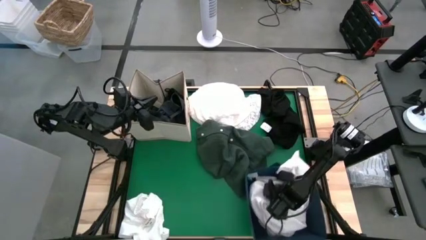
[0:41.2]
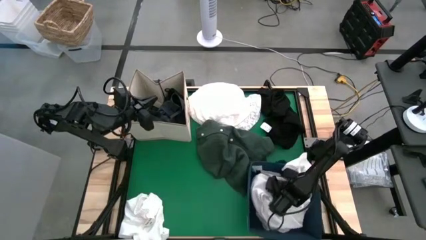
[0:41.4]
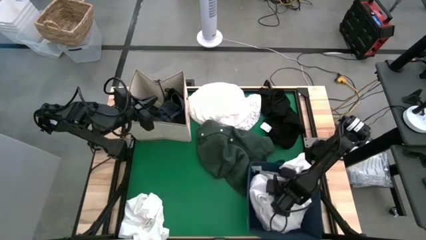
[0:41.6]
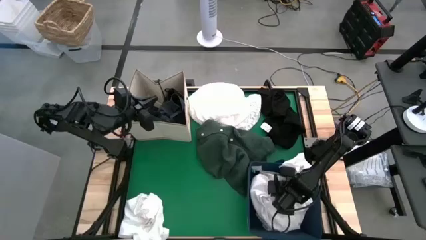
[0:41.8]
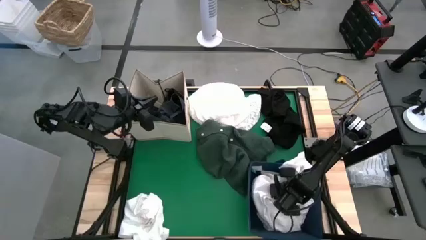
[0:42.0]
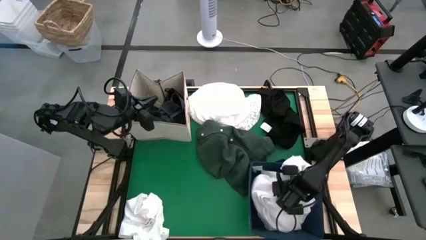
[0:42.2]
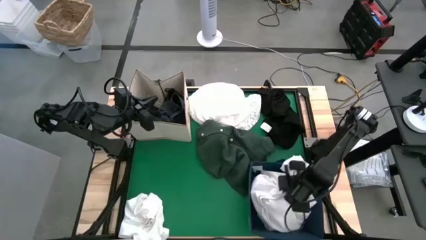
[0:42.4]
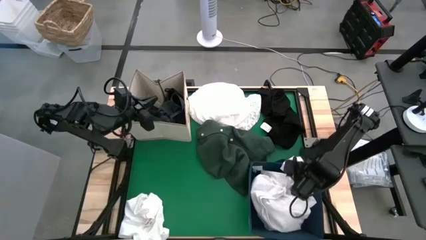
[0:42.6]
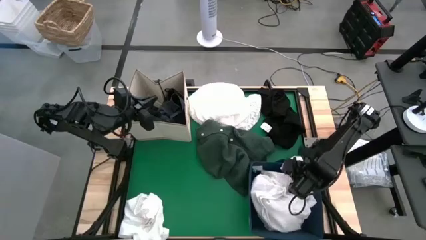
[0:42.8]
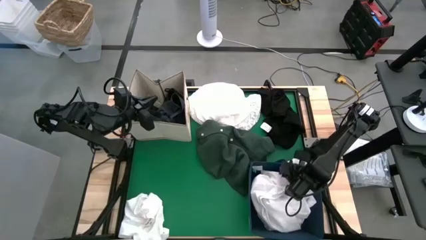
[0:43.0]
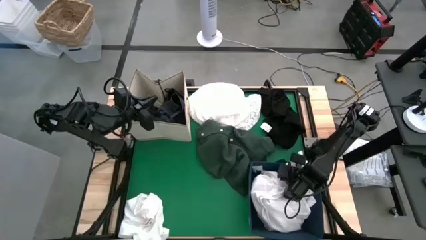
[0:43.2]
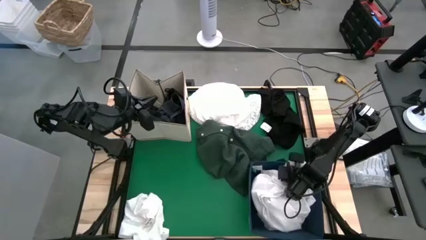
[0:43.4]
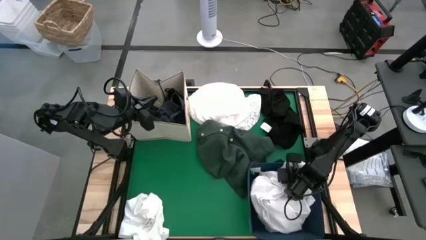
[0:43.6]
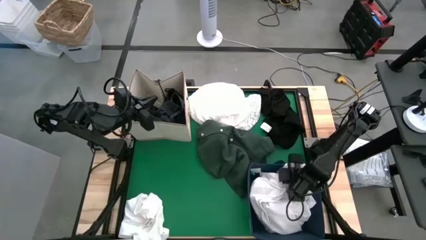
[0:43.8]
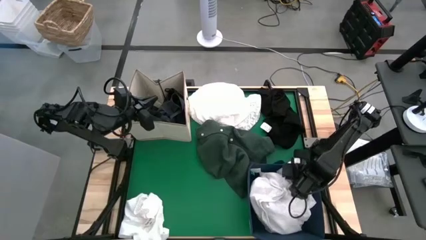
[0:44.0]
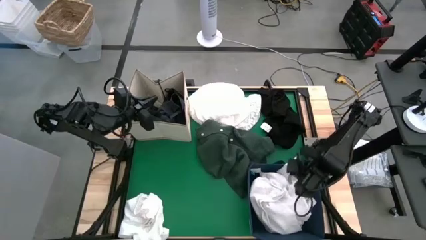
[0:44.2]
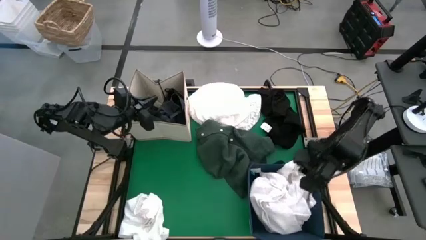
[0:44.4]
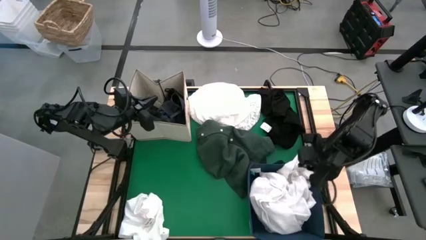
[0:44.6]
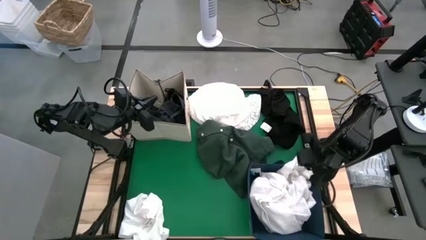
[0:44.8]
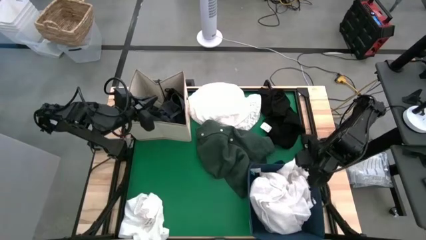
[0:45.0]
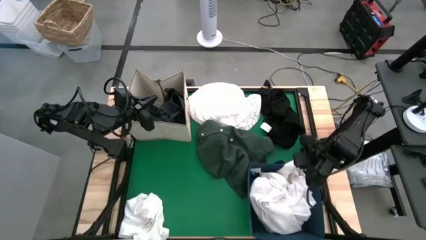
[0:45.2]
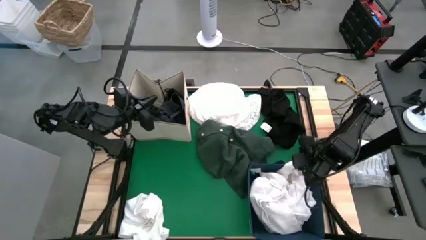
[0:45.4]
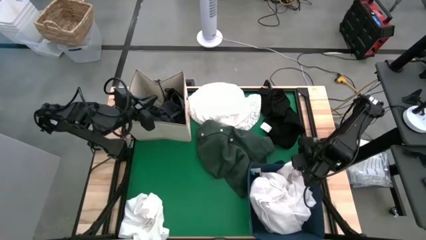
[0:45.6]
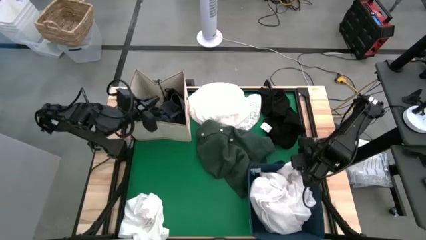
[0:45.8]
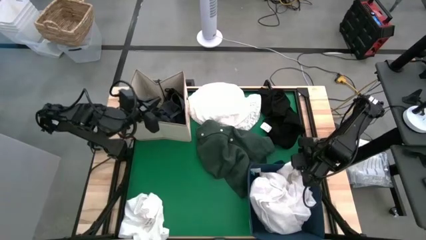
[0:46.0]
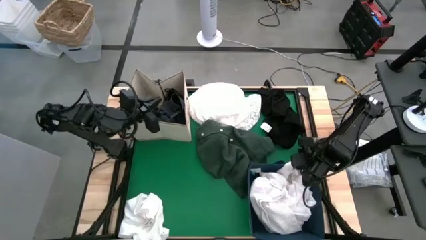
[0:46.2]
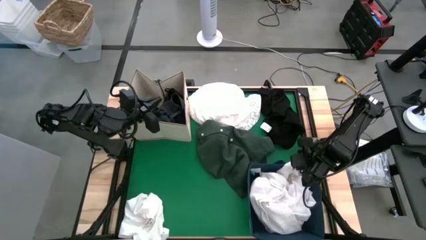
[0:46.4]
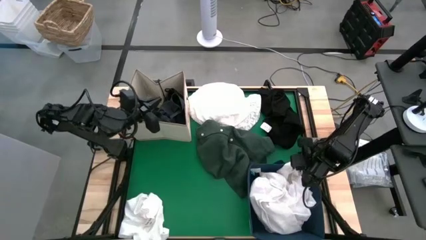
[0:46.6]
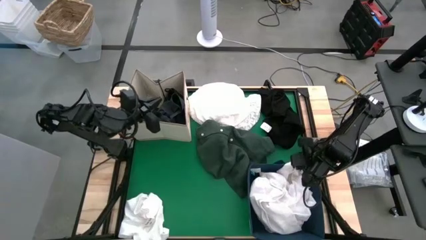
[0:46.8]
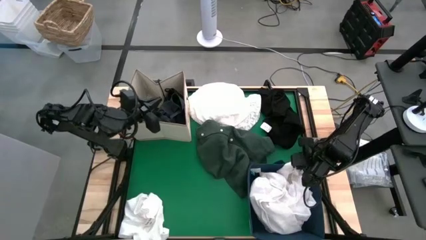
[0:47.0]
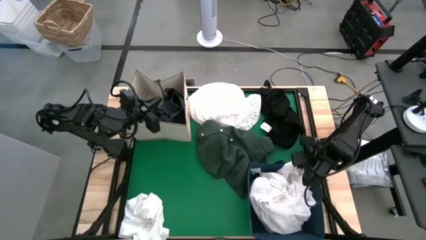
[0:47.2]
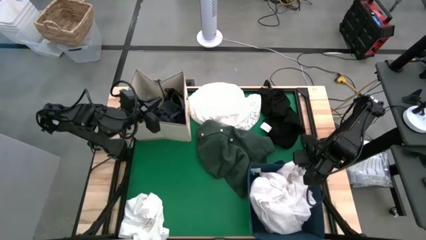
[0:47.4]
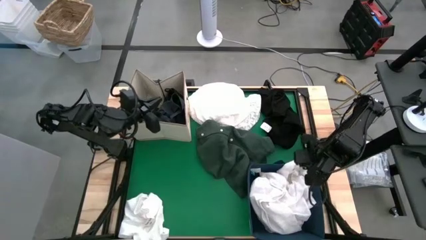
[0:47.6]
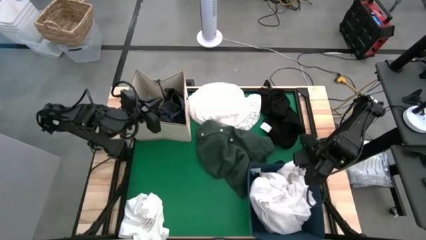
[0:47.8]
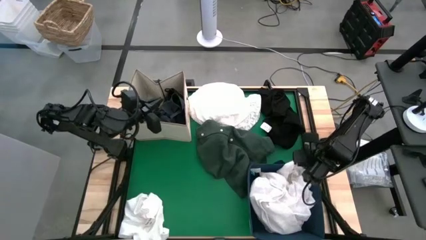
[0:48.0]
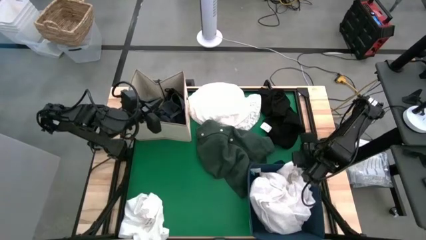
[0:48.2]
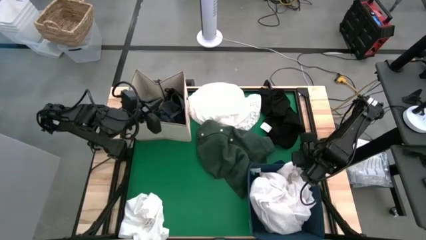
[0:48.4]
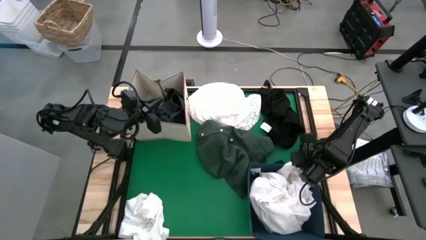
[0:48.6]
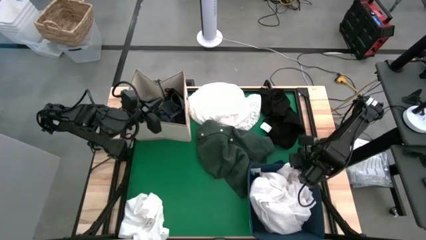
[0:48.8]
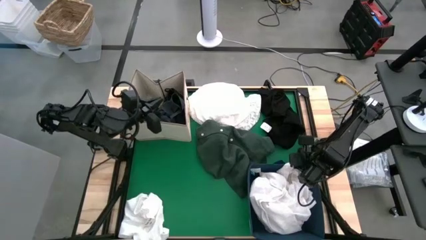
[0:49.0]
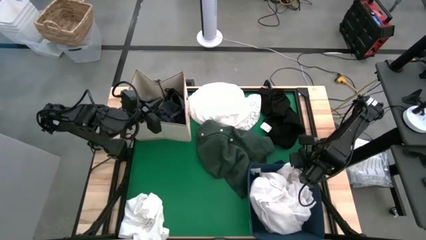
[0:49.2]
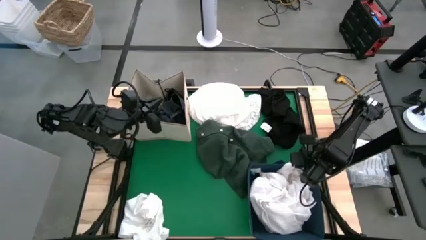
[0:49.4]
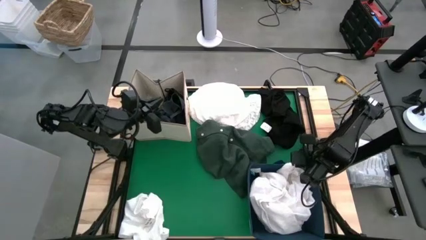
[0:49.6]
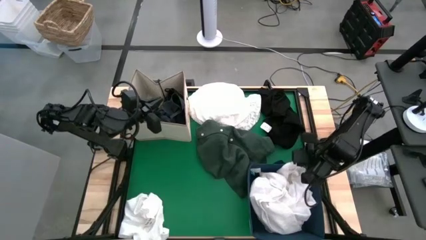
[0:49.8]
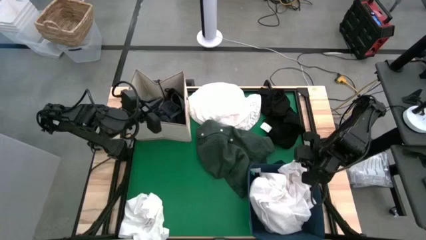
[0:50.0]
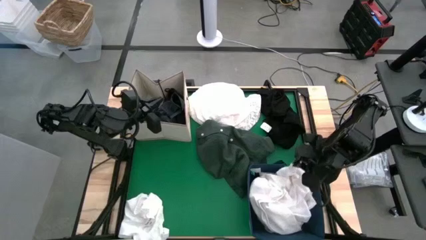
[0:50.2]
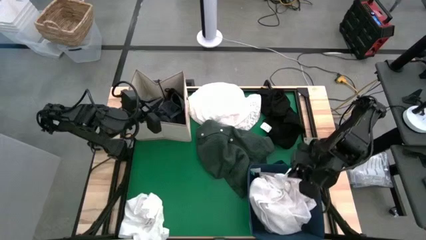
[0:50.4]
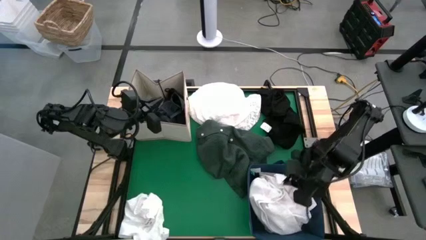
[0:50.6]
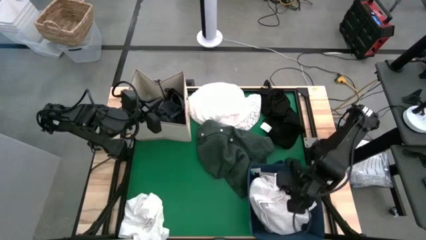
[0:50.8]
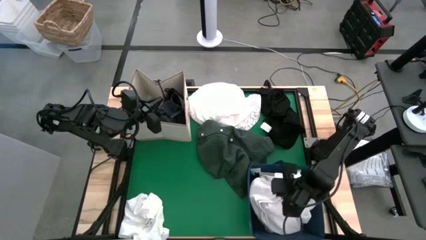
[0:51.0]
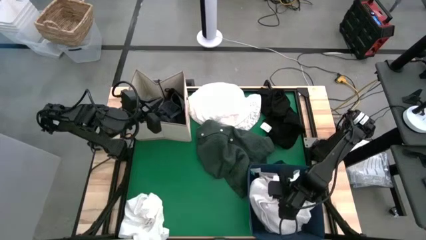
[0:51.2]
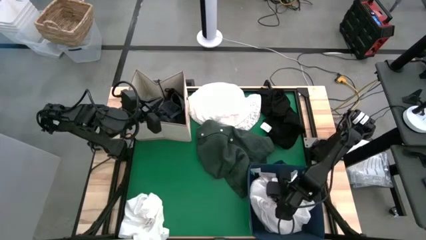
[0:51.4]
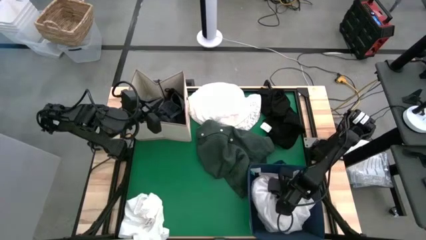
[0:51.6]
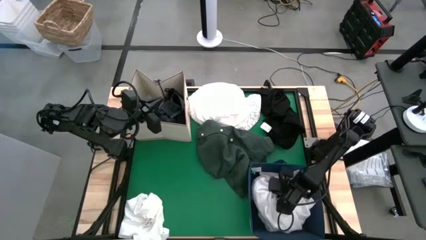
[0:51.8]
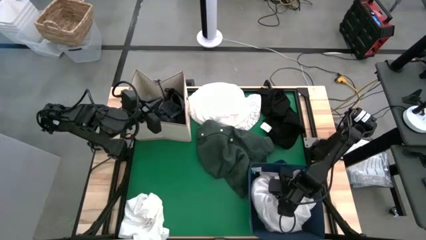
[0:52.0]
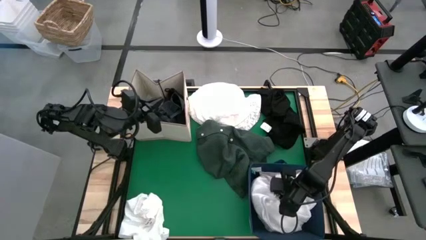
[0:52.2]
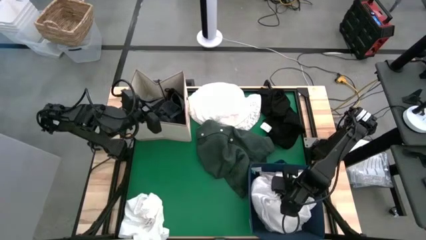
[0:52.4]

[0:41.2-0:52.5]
Put the center white cloth into the blue bin
